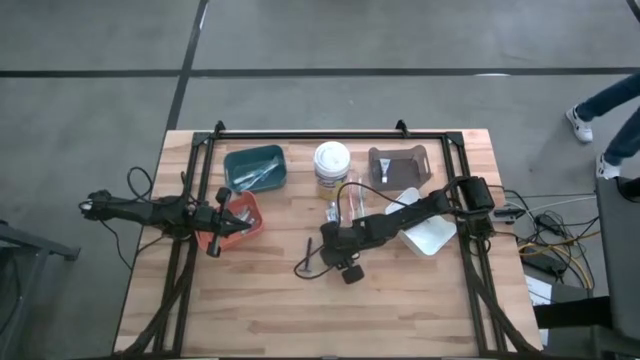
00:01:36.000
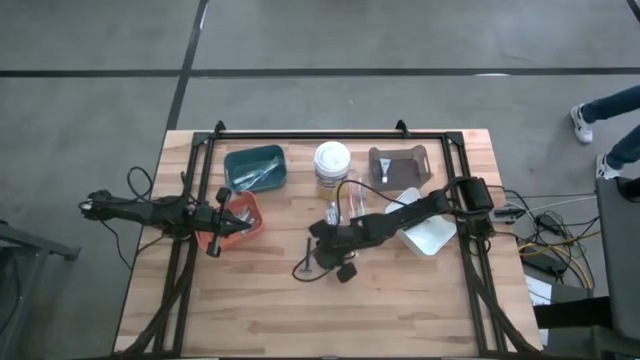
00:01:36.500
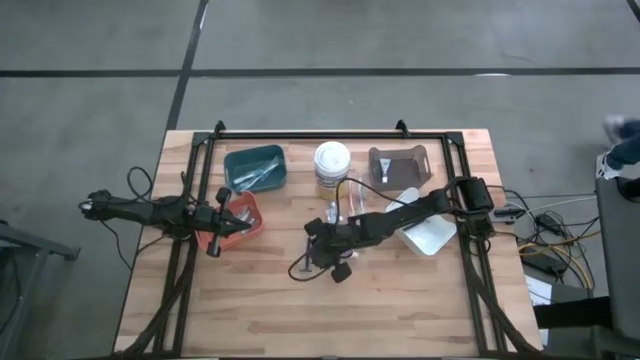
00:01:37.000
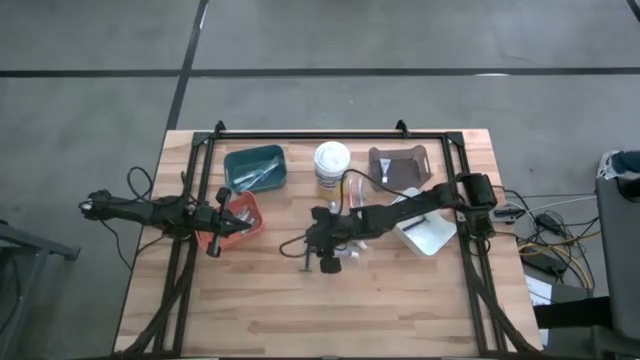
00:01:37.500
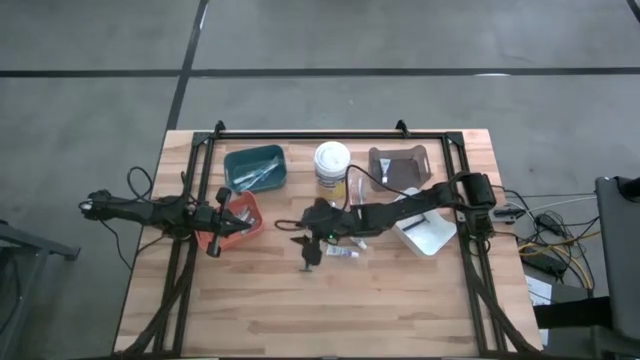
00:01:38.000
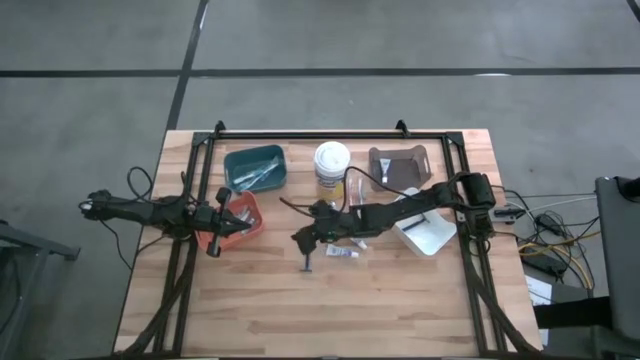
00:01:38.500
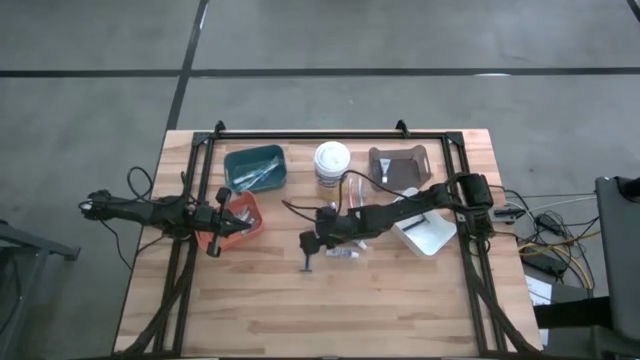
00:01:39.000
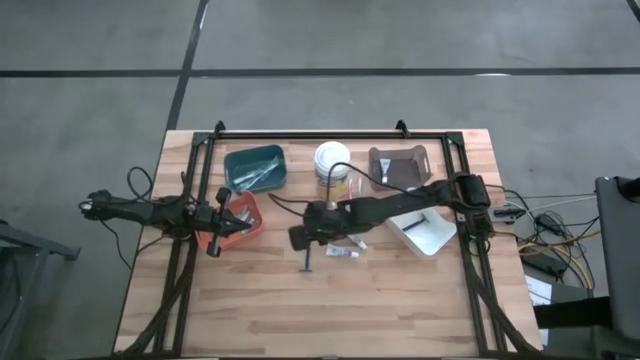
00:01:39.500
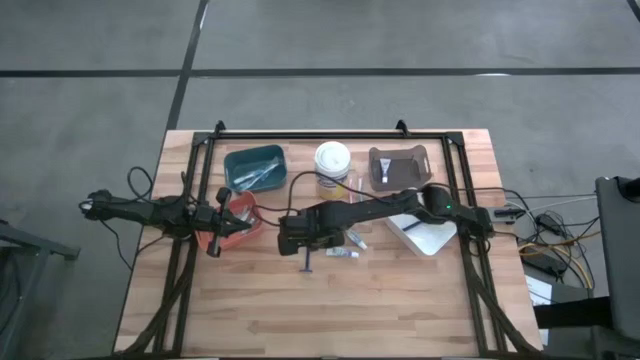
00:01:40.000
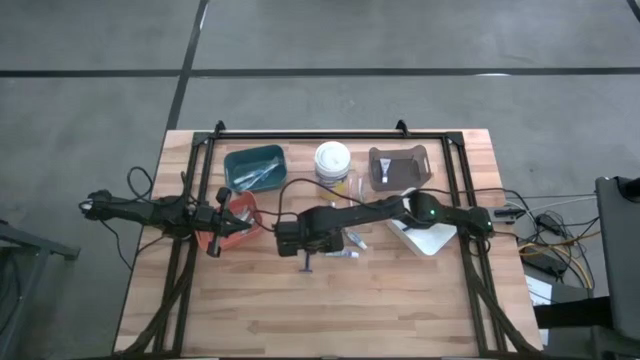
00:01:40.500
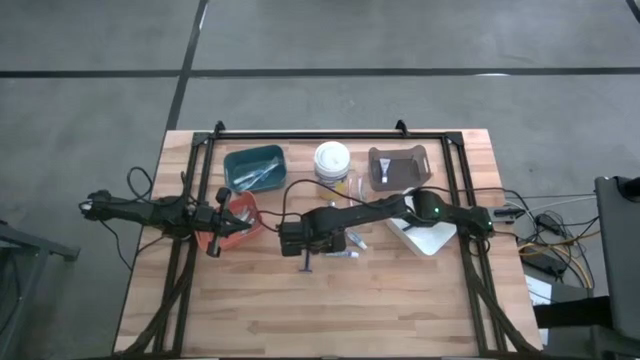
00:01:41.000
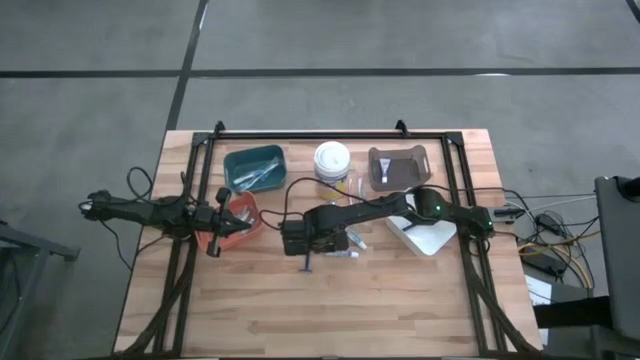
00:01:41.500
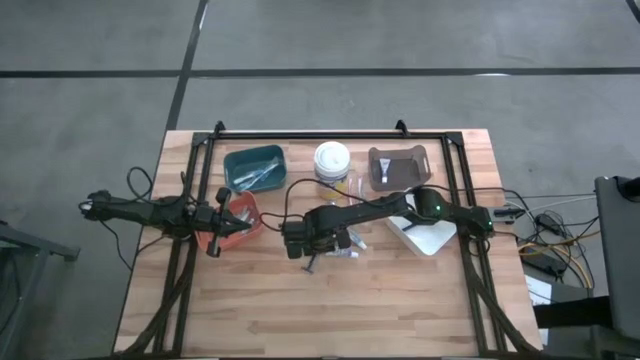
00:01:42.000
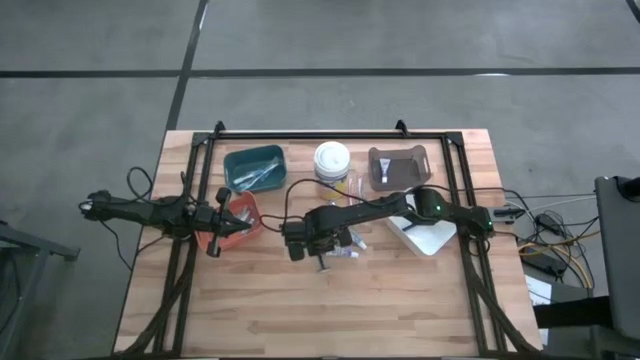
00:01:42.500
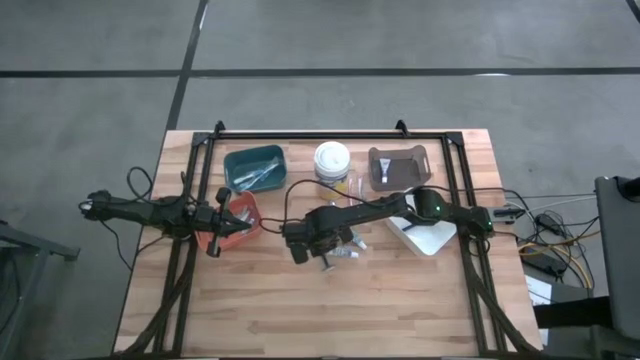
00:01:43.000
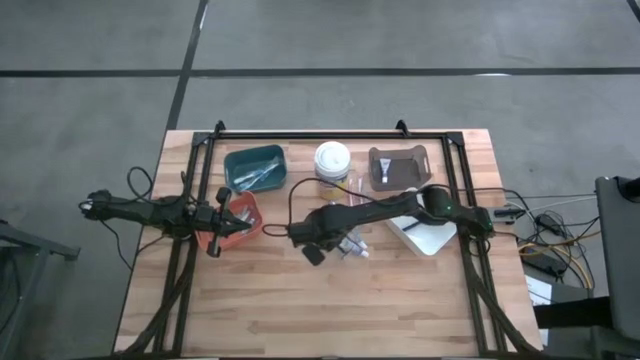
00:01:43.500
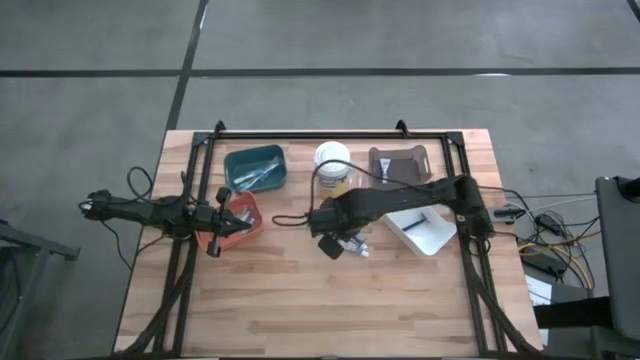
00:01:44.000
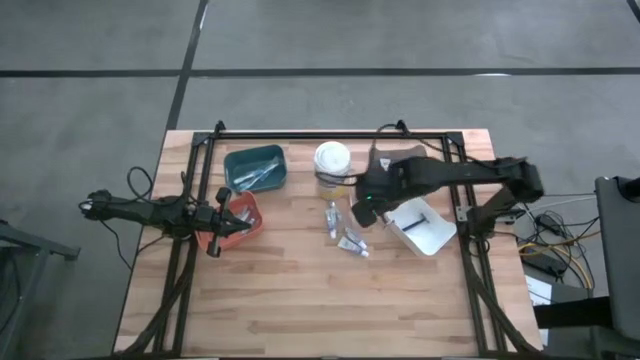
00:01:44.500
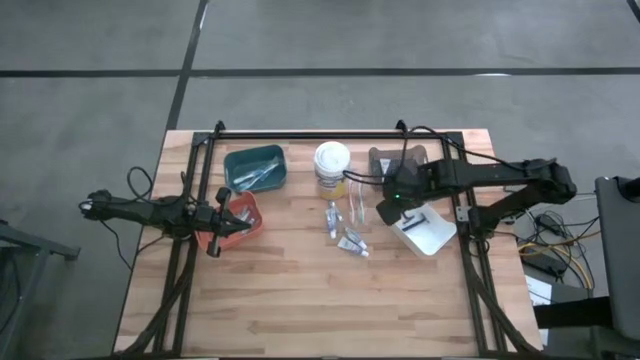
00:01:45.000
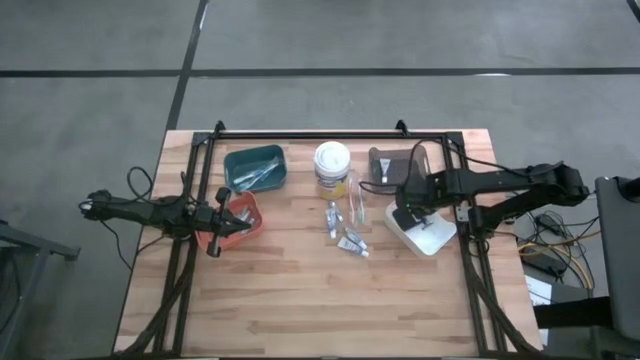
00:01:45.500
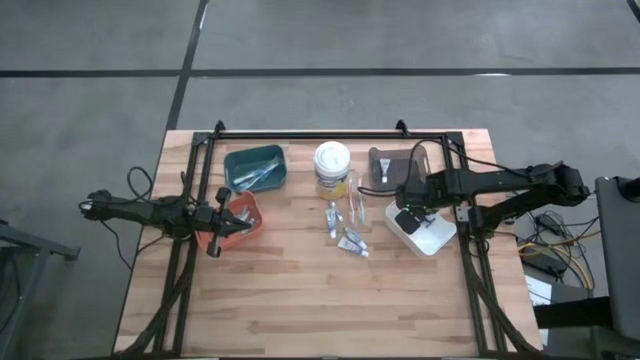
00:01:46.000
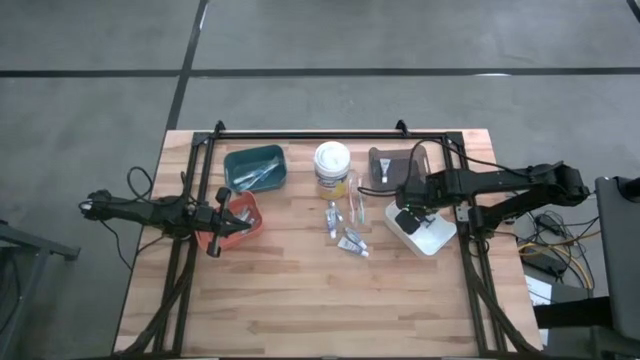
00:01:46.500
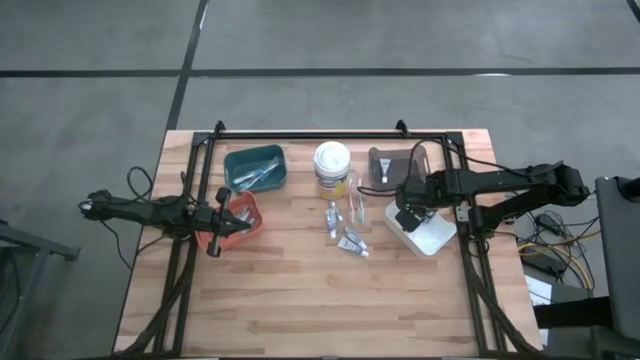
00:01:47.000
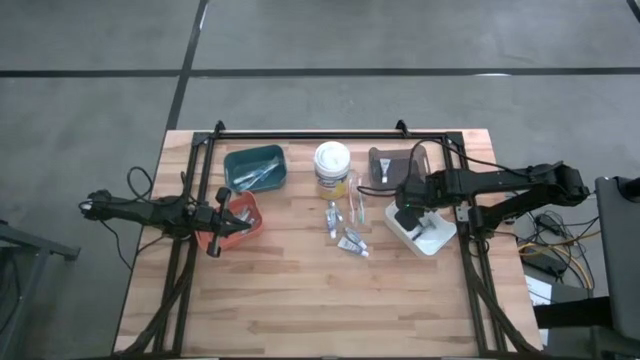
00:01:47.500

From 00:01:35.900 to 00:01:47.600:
Task: Pick & Place Travel size toiletries
Put the razor into the white bin

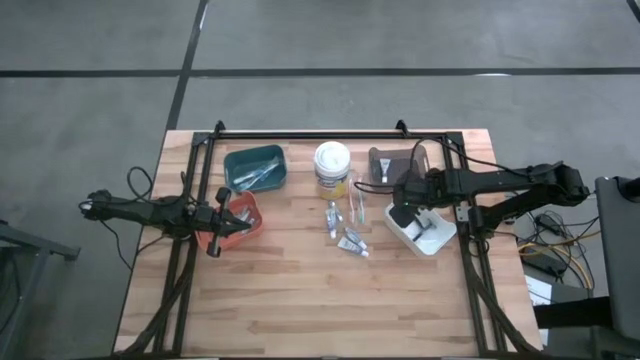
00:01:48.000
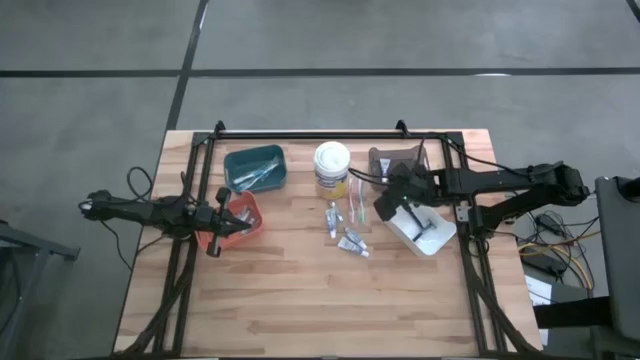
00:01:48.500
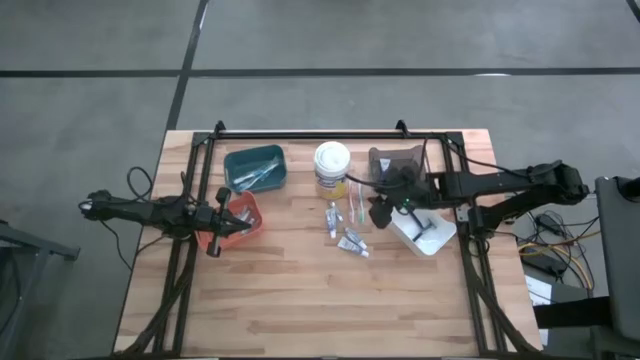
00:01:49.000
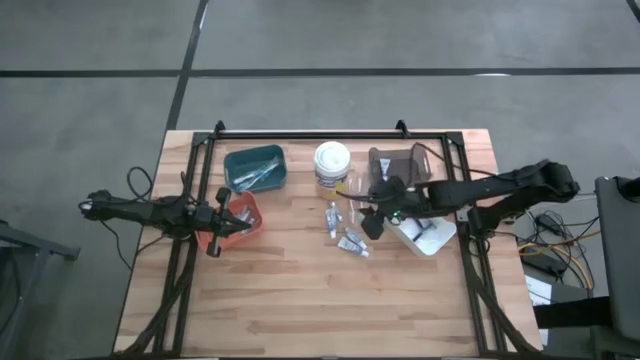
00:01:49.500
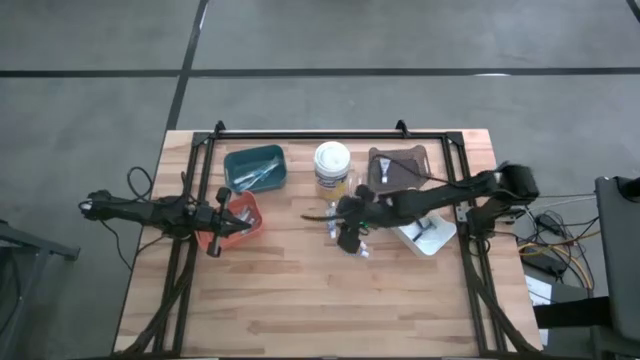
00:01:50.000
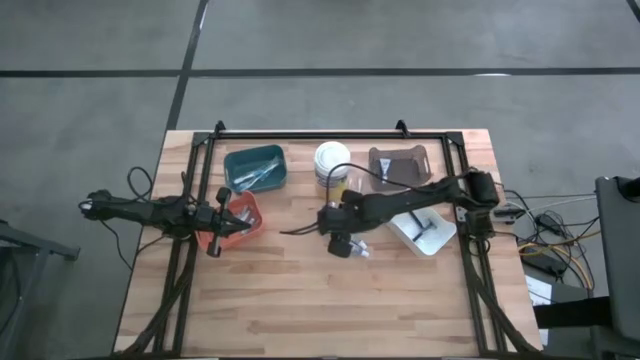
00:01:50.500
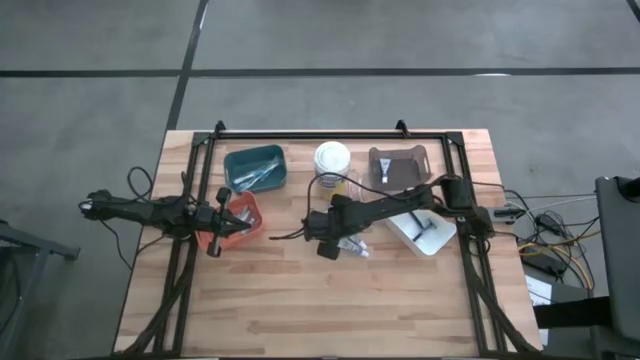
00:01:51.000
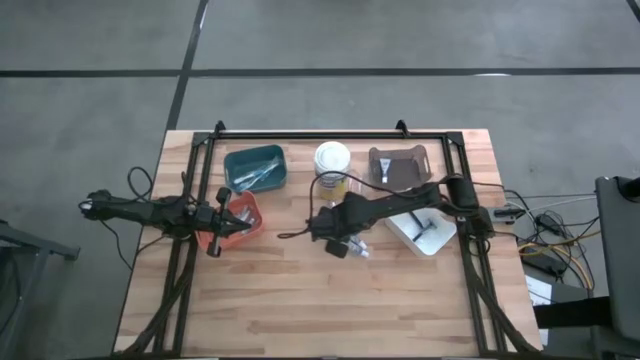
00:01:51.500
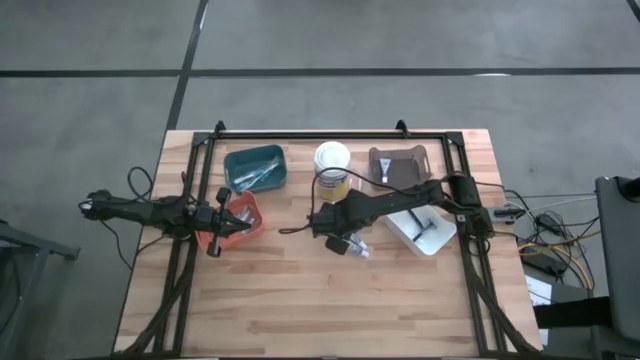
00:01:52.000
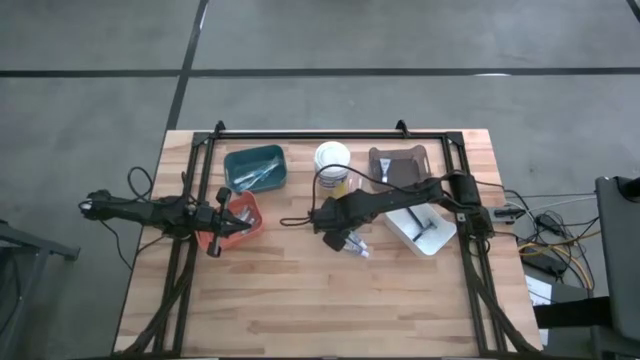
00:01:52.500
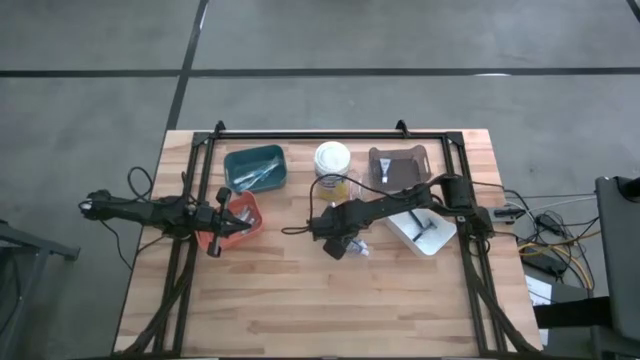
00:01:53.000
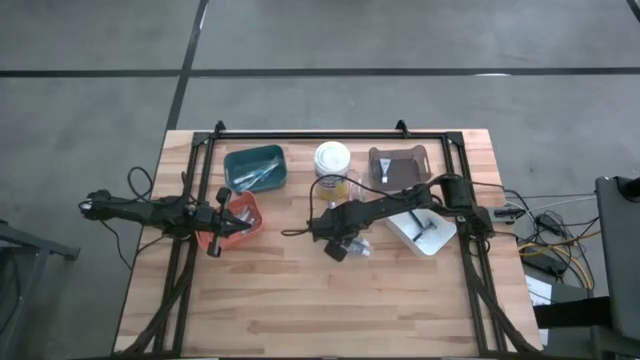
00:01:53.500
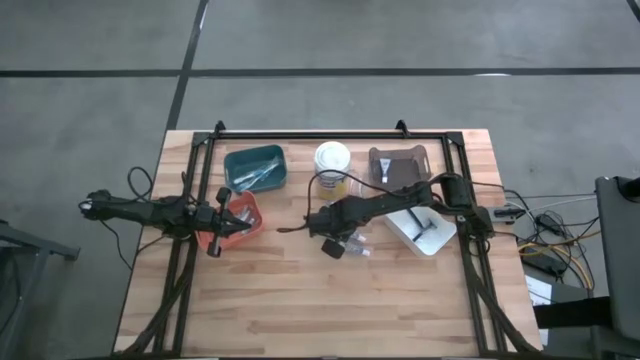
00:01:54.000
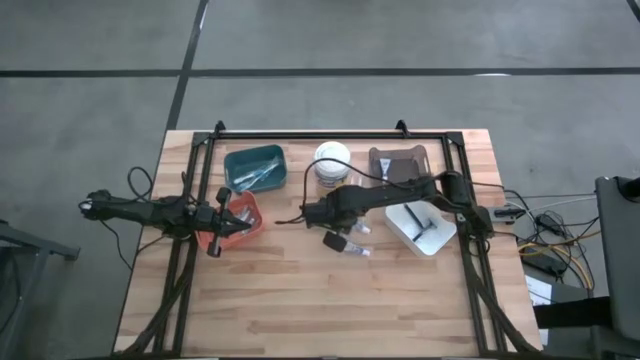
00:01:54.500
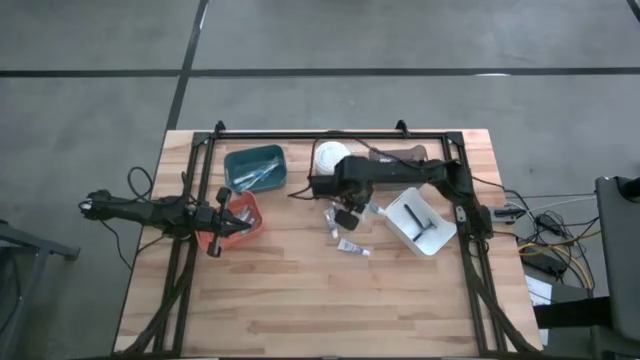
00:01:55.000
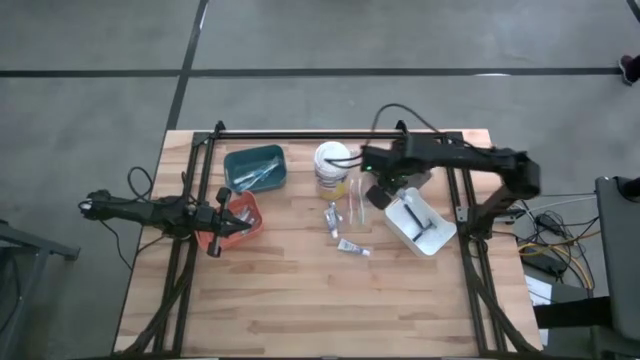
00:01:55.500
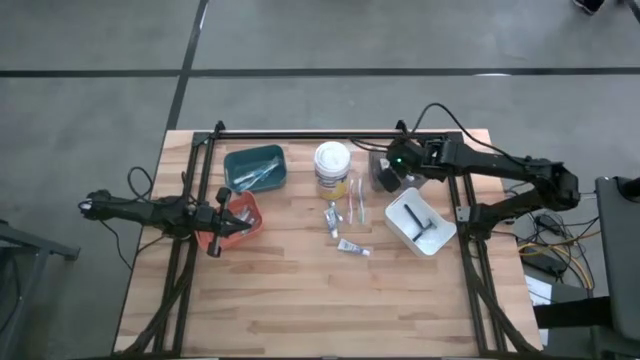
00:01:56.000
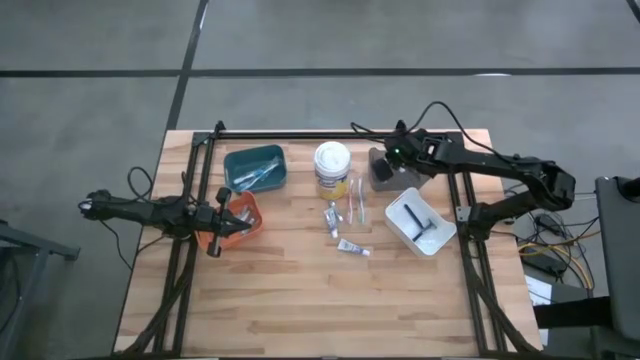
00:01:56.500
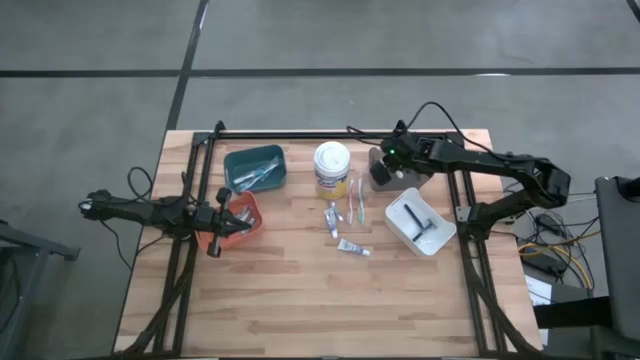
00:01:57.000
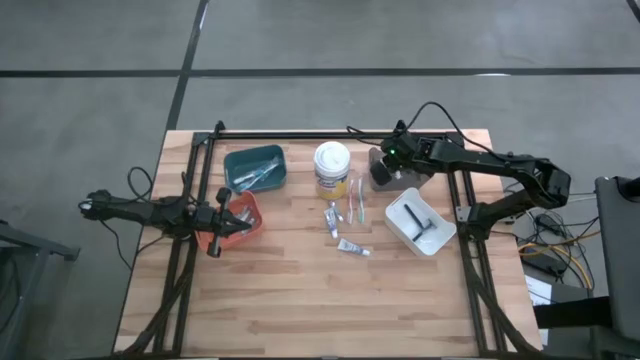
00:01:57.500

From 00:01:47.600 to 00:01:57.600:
Put the bottom right toothpaste into the black bin
